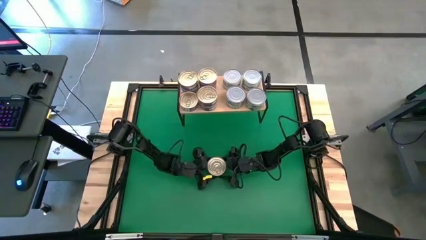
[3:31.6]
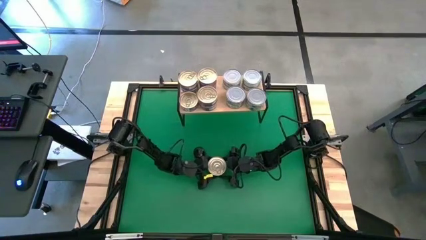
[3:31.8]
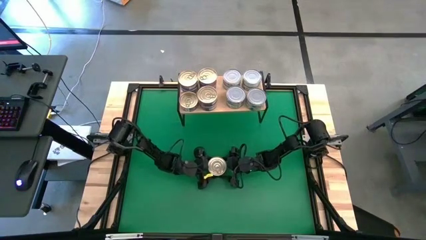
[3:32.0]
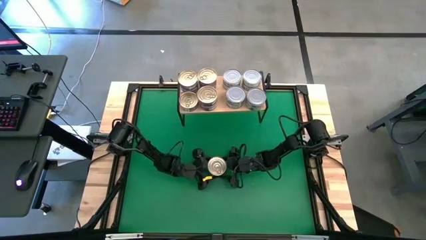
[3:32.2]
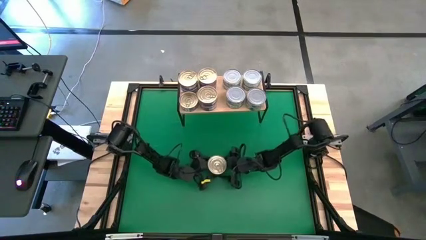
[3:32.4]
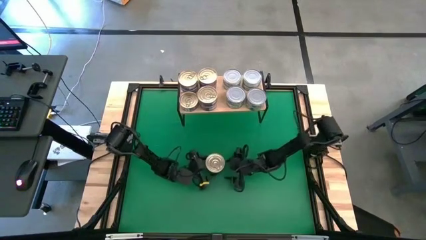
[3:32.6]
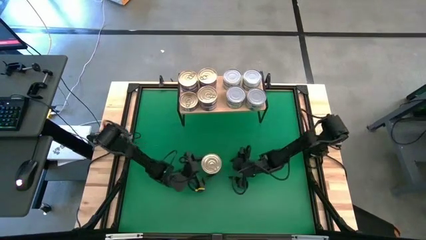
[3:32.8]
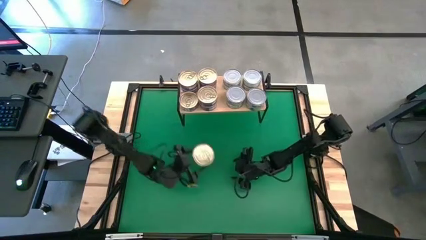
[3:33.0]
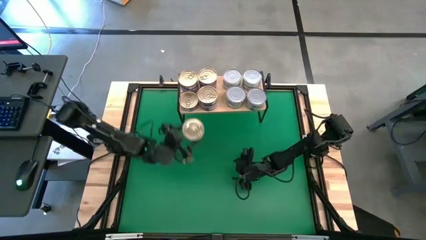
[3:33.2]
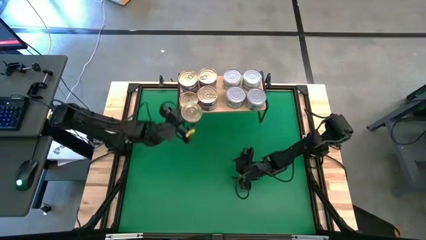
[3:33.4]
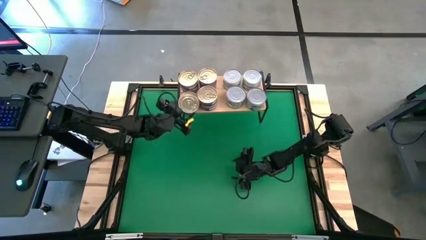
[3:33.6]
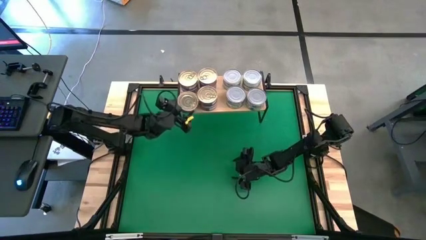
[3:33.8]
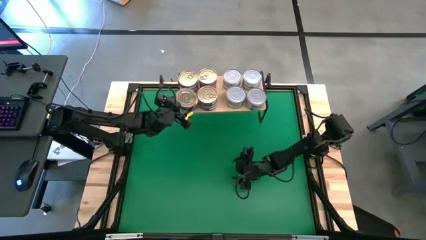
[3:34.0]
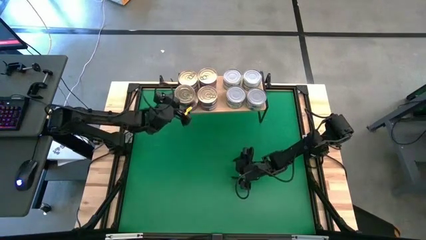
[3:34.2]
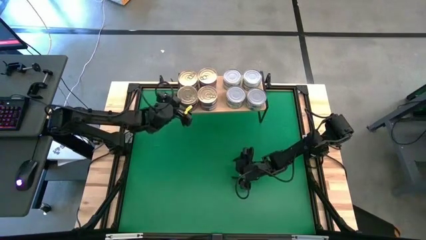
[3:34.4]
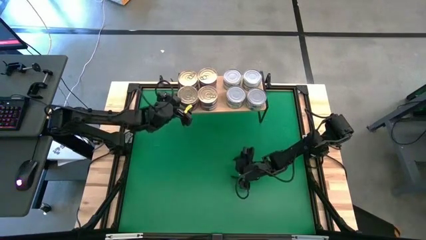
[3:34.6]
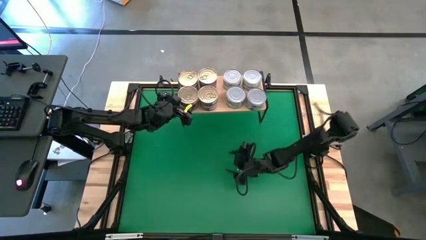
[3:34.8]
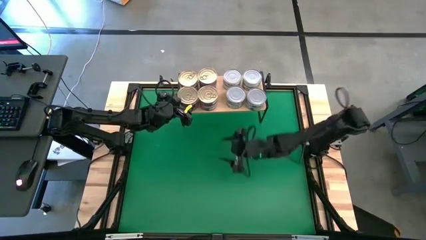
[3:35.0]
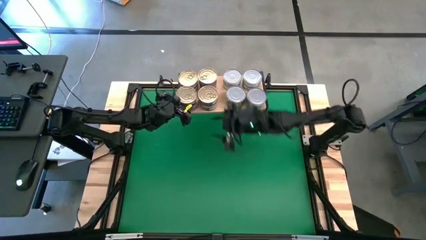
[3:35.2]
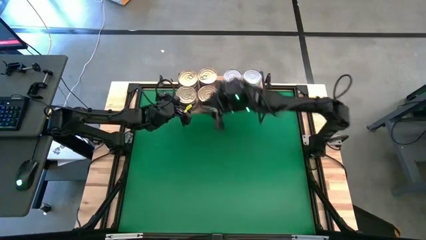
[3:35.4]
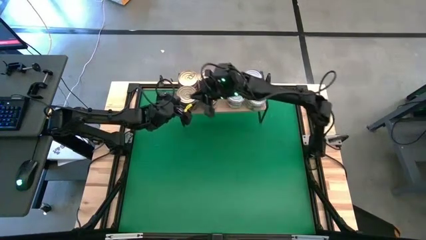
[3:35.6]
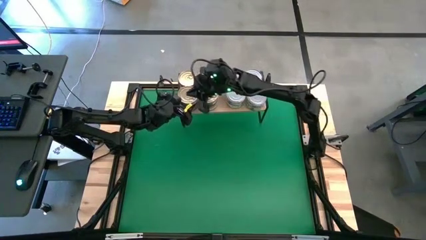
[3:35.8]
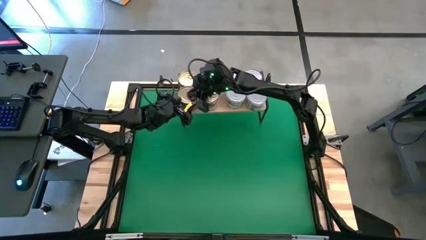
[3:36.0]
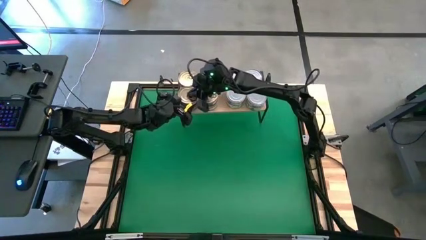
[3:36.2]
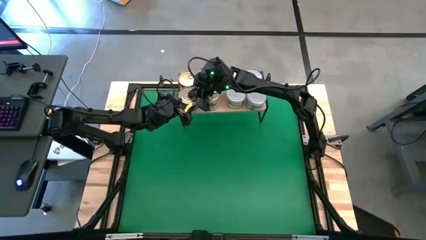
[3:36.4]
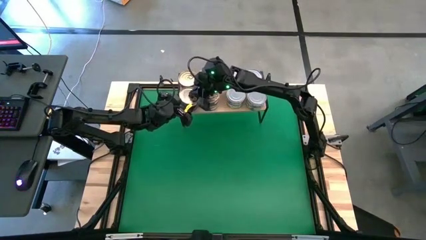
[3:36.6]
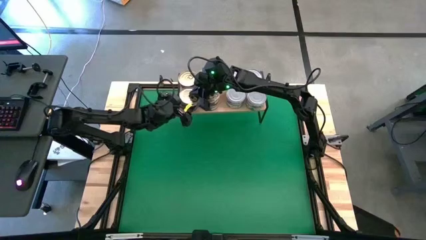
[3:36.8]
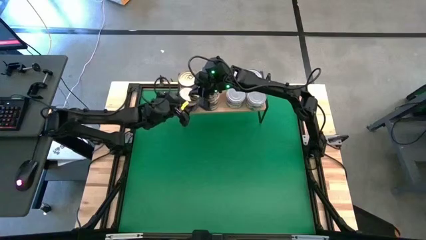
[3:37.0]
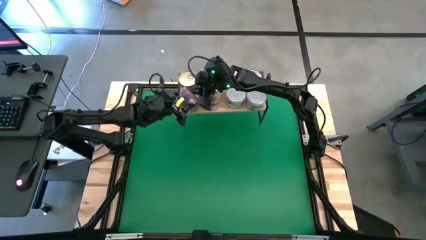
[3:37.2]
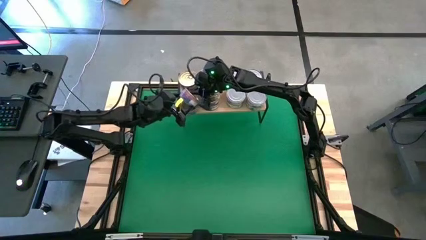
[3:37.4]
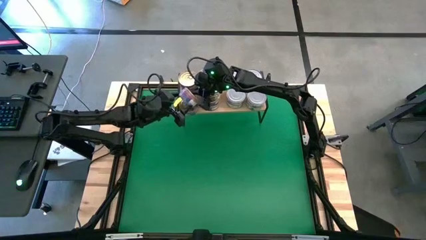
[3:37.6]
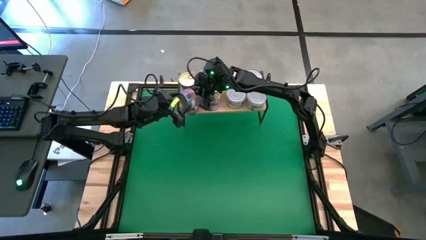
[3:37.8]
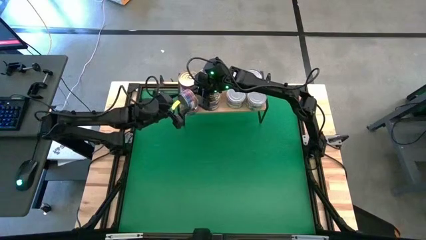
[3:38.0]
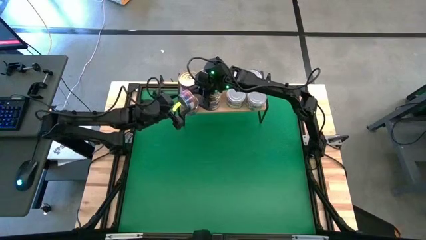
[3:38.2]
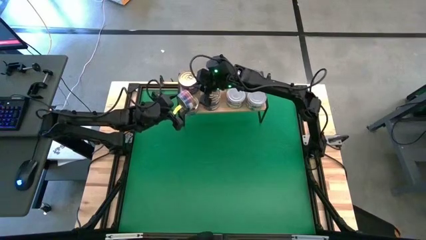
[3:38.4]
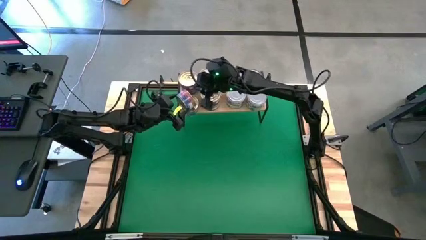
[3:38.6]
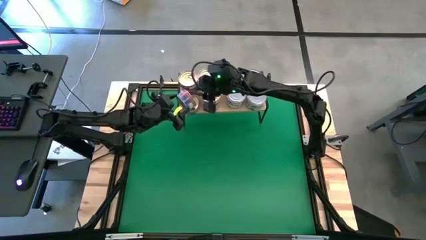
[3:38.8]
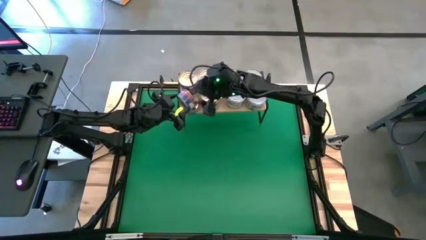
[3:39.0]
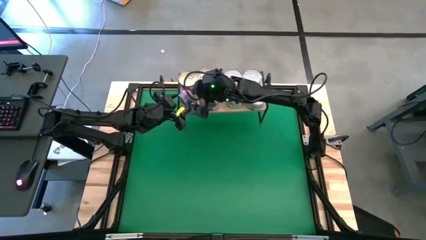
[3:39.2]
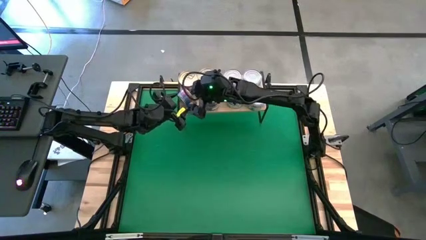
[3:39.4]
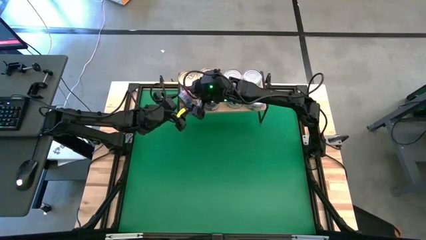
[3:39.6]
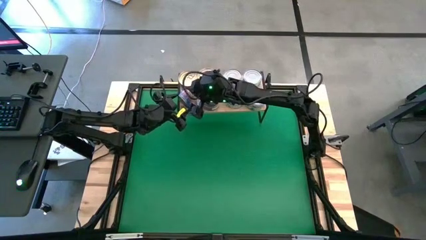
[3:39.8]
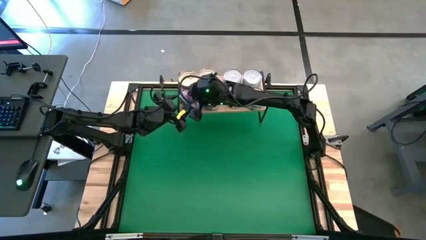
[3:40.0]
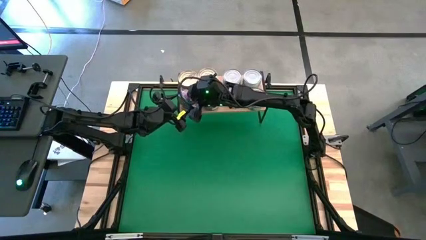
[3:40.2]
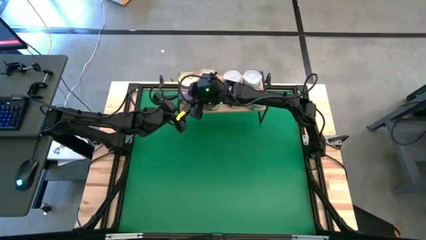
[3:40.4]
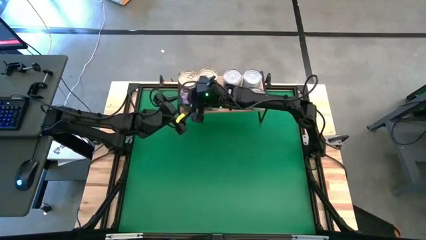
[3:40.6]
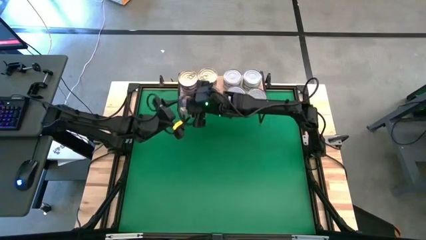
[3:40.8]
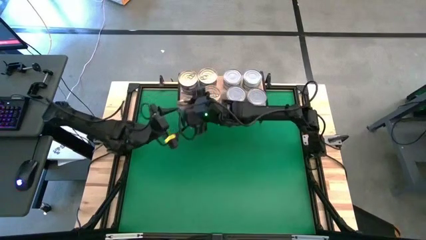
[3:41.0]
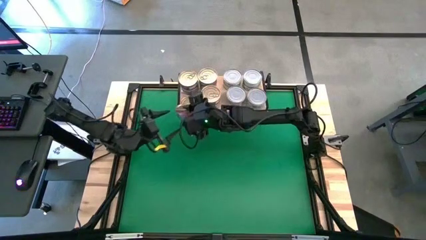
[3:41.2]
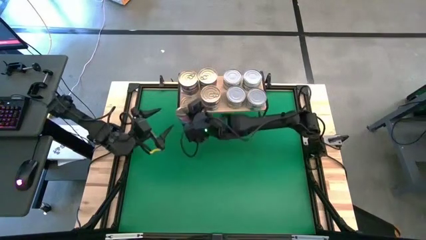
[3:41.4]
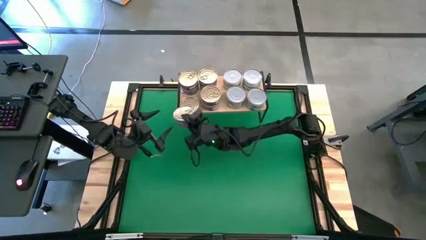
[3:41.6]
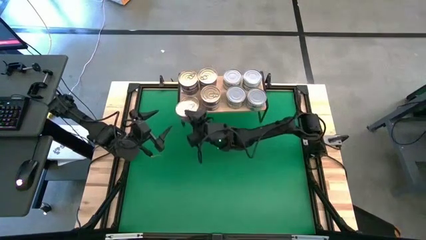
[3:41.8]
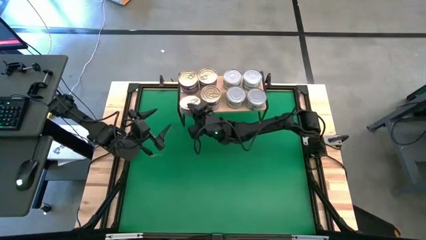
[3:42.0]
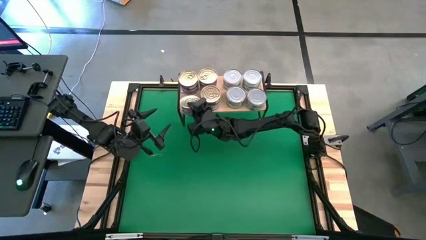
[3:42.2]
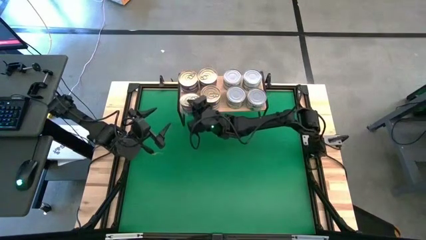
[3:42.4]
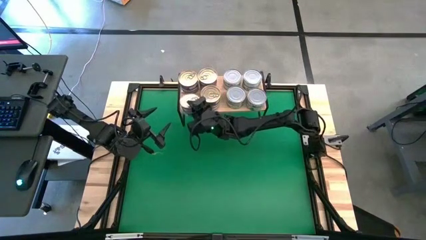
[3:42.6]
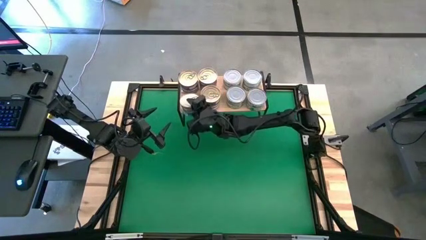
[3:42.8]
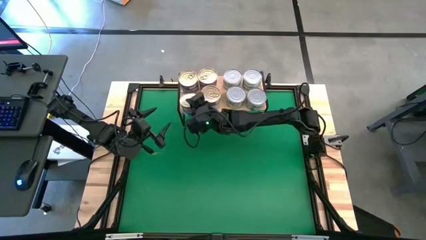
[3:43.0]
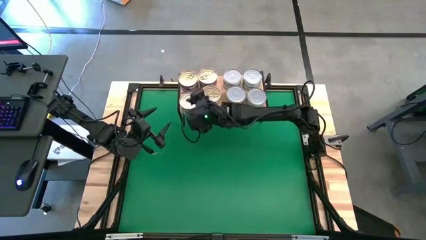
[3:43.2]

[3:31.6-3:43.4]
Task: Stack canned seafood by type on shelf
Stack the blue tuna can on top of the other blue tuna can on the shelf

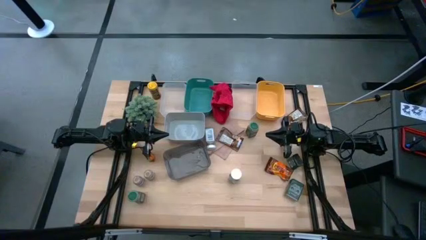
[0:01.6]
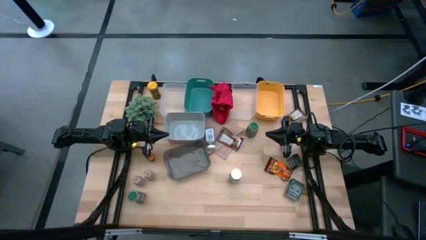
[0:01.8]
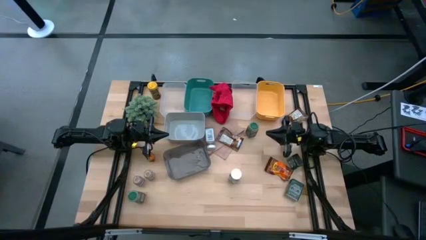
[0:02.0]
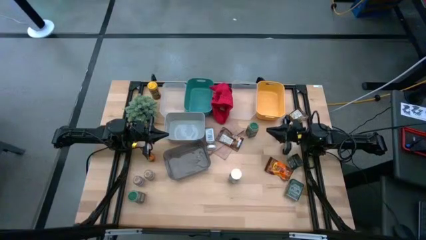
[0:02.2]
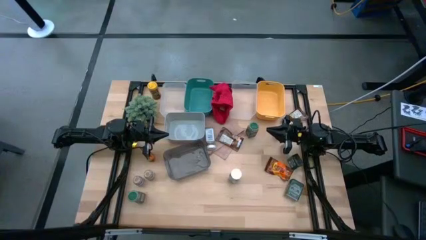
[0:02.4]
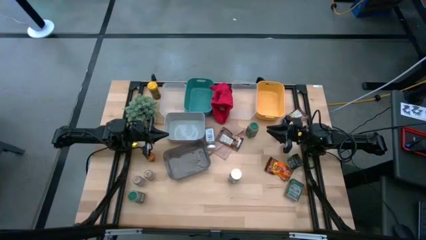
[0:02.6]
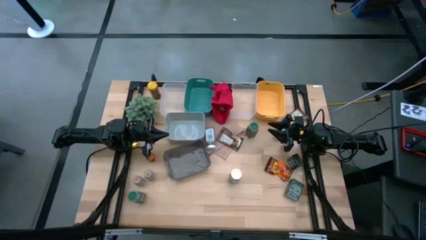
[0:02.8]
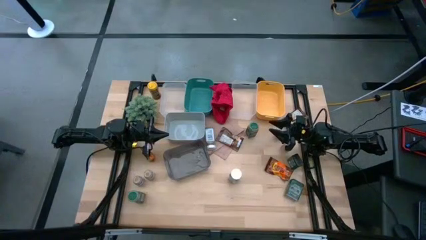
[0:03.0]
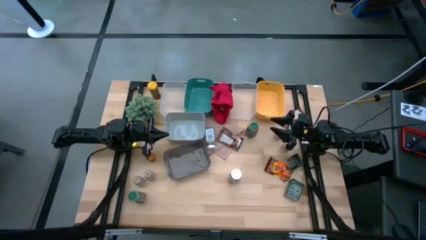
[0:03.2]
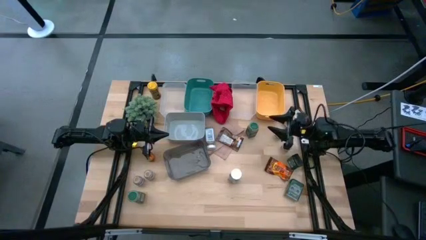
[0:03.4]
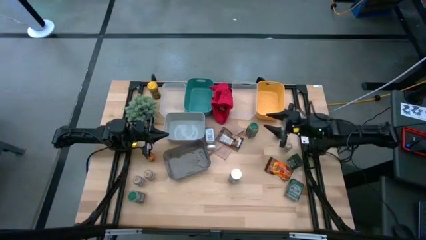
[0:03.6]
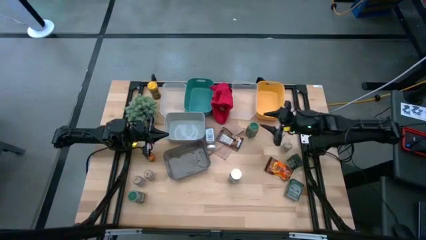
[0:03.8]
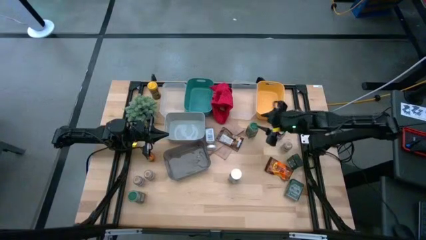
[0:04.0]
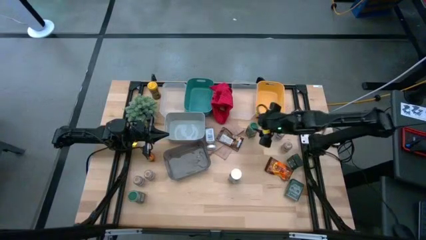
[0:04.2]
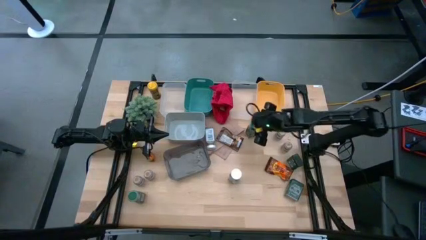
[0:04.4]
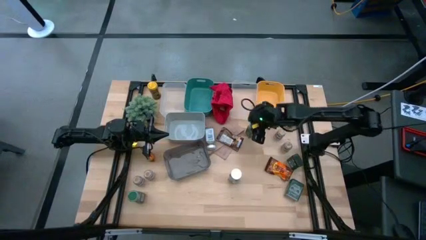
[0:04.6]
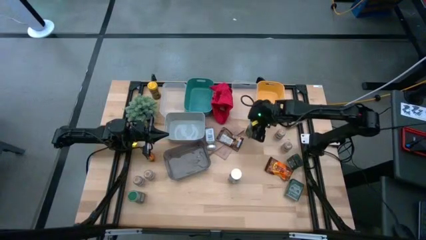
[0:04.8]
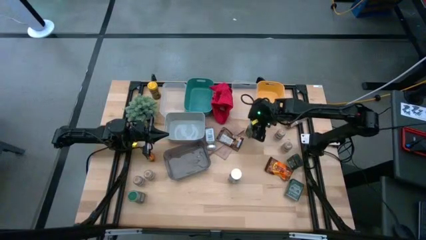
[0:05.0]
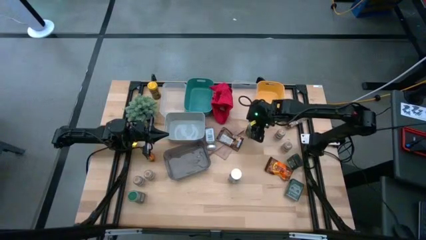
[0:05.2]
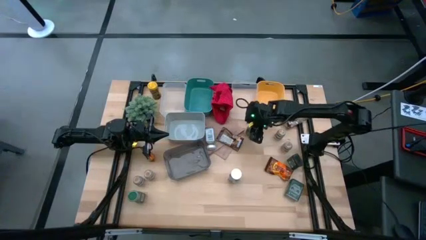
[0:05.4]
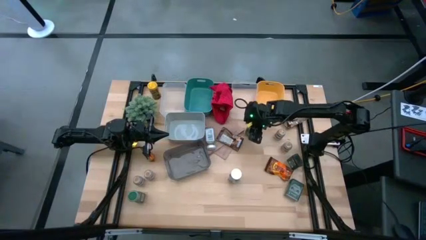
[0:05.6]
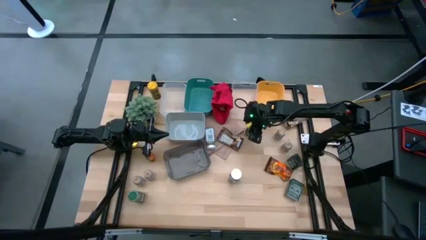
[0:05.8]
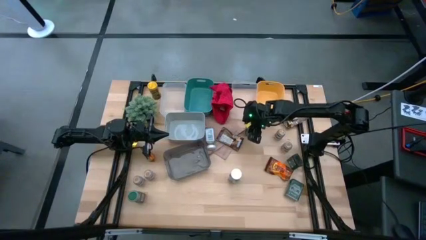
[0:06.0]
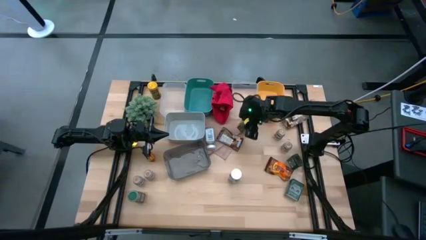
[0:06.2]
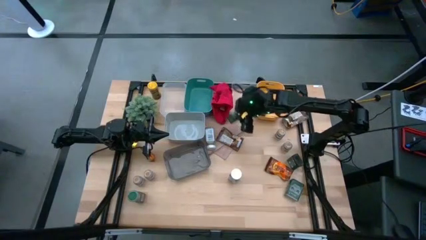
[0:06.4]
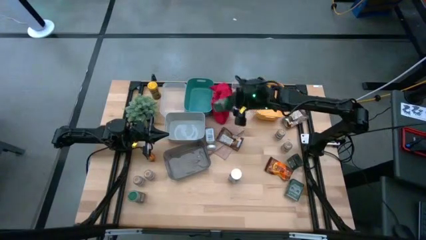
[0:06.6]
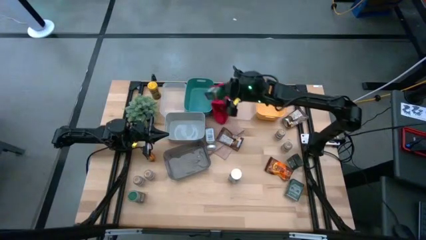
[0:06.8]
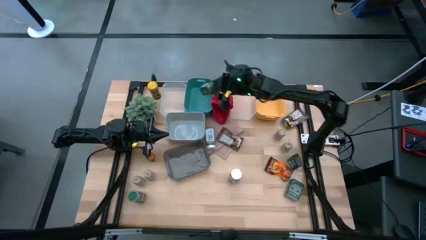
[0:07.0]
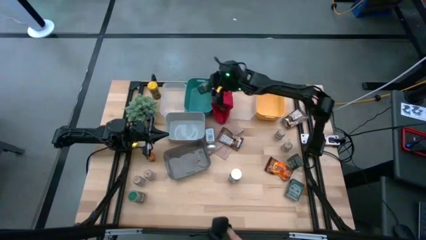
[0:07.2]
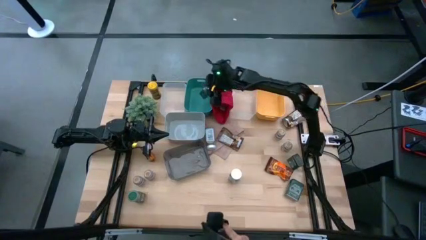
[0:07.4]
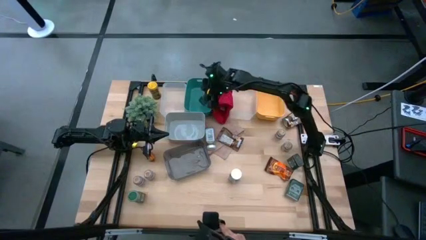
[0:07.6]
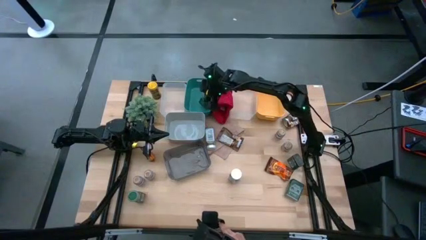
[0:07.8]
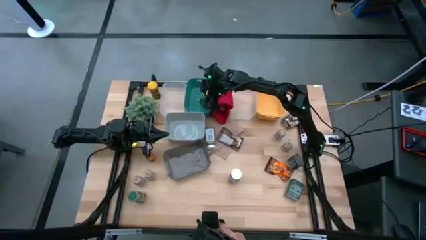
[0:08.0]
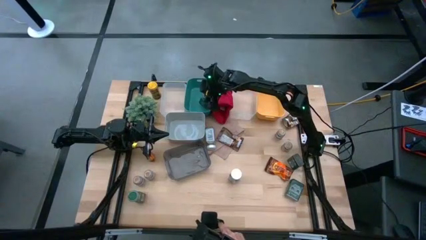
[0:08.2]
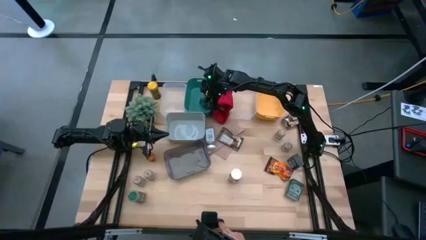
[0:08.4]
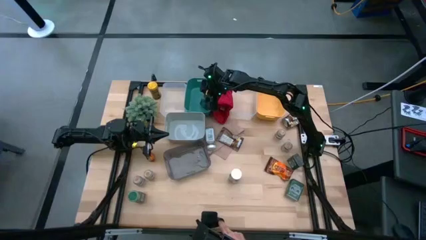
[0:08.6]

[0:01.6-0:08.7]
Task: Sort spices by type
Put the green seasoning bottle into the green bin
